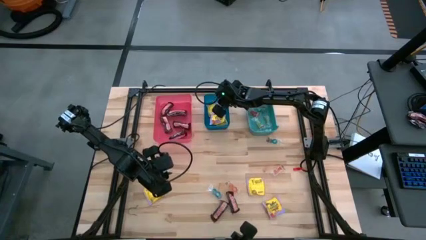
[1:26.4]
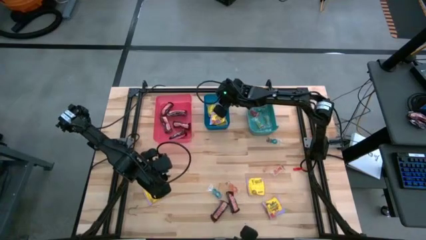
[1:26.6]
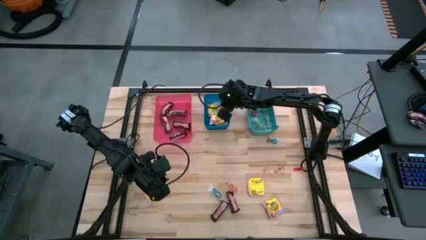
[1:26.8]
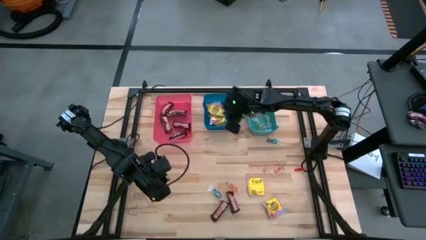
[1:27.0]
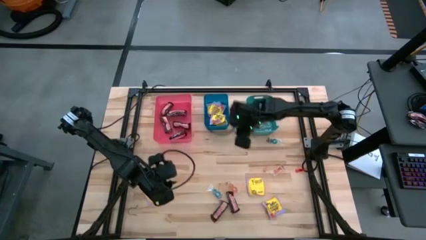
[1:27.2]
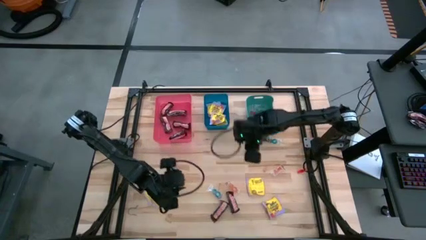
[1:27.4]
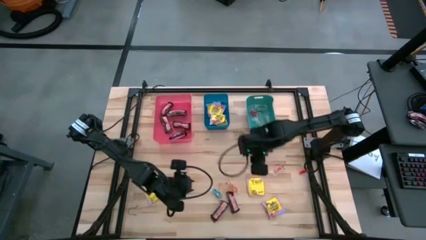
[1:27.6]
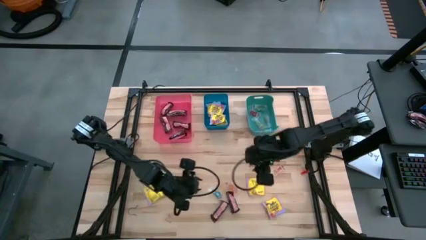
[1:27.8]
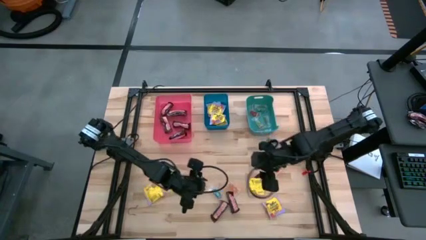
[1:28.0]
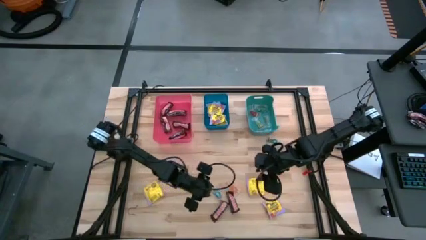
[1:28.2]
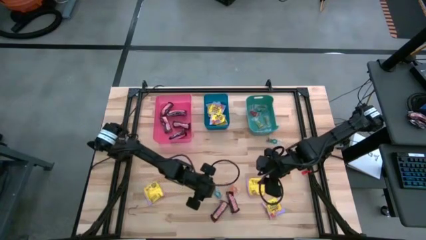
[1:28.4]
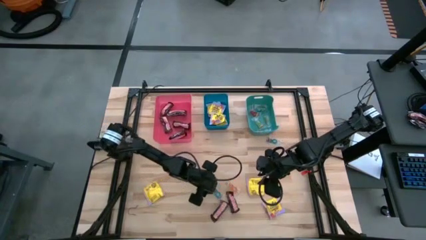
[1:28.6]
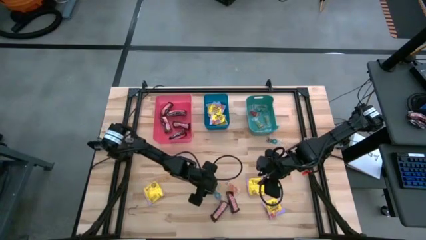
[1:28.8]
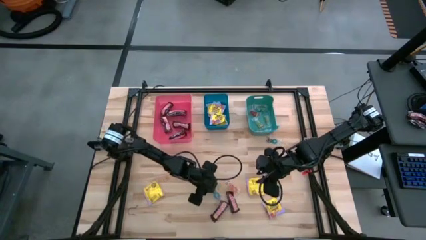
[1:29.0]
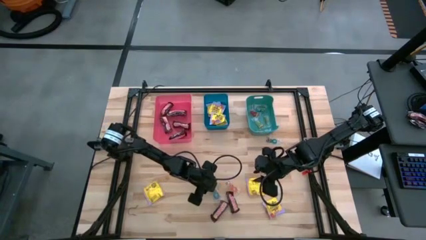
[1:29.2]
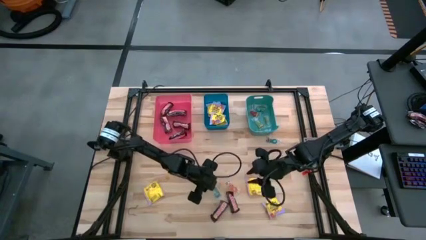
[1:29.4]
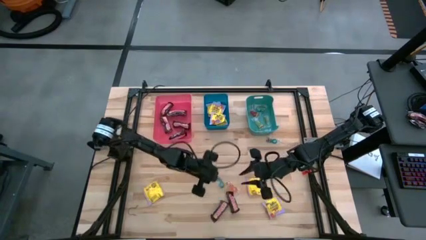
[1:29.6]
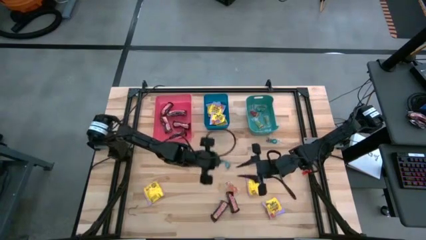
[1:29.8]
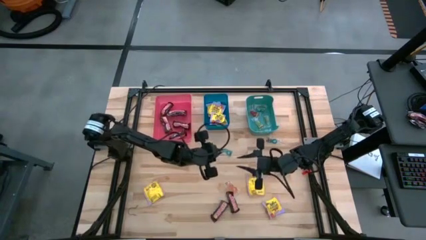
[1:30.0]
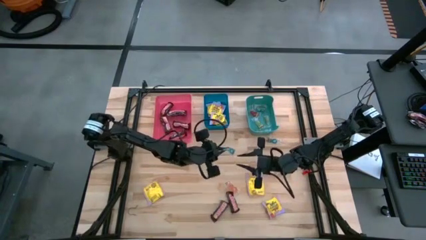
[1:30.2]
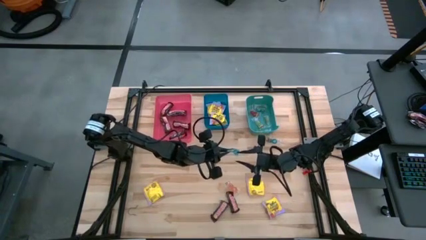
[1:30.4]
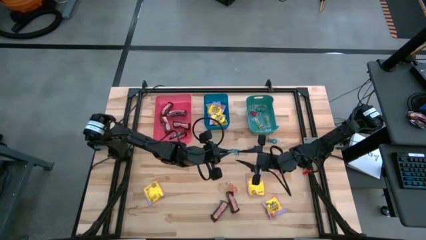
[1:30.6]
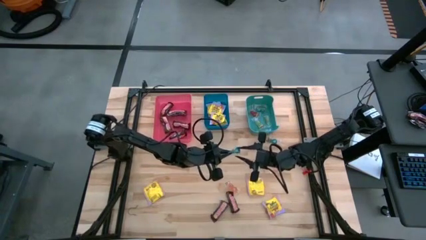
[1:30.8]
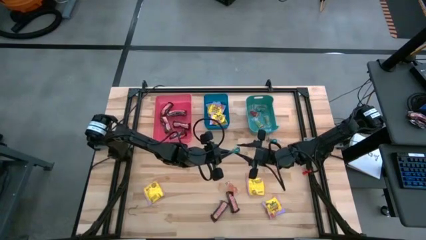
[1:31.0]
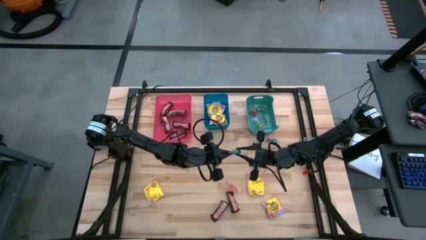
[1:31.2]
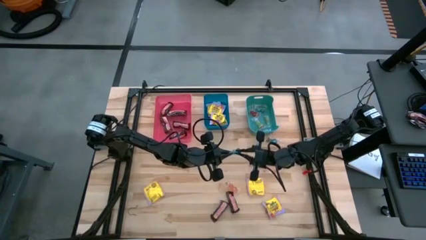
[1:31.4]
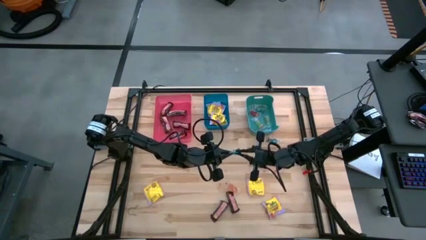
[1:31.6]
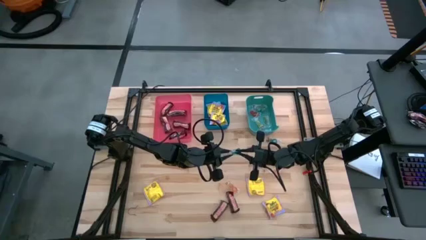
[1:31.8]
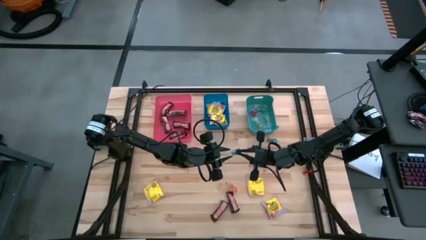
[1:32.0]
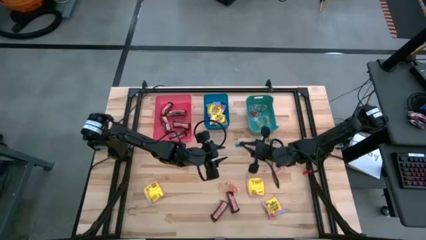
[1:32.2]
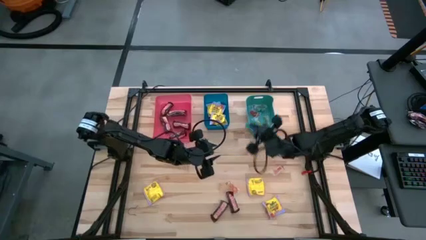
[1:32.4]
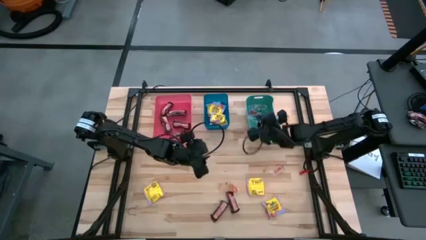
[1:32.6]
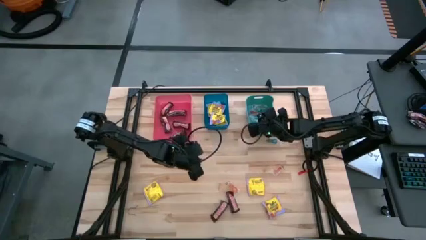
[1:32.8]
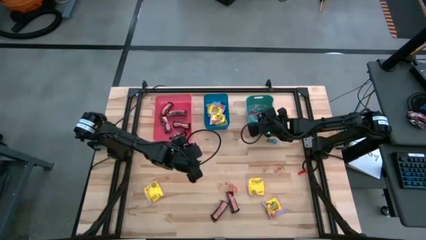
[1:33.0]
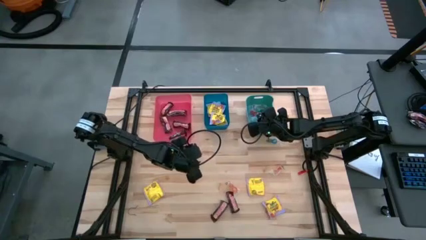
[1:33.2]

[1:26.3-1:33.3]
Task: Sort candy
Put the blue gummy candy into the green bin

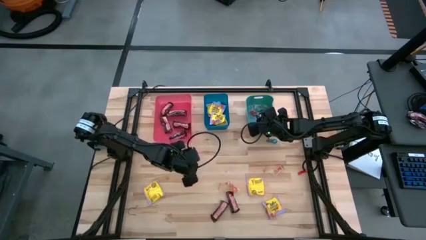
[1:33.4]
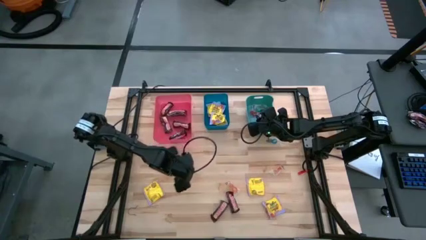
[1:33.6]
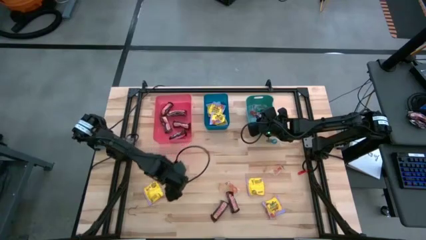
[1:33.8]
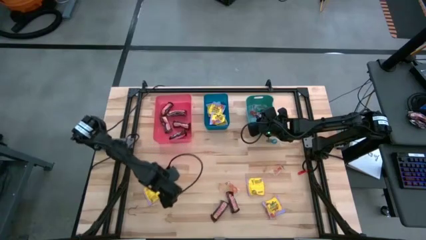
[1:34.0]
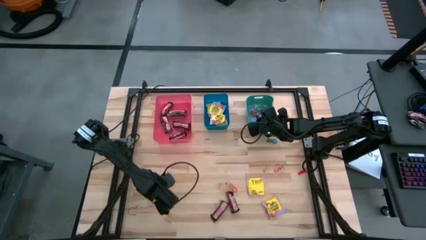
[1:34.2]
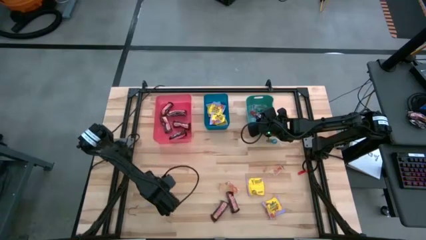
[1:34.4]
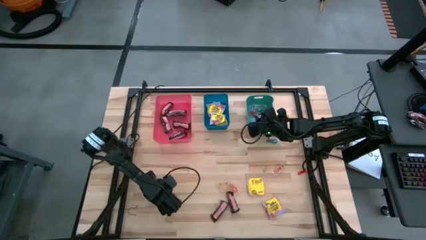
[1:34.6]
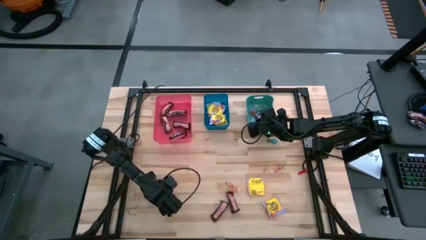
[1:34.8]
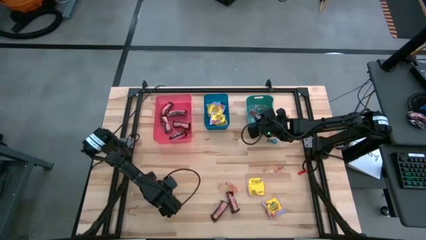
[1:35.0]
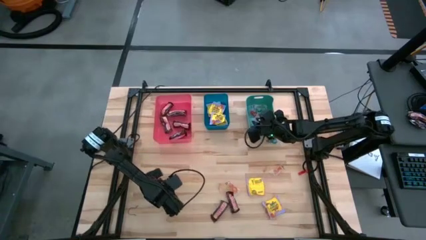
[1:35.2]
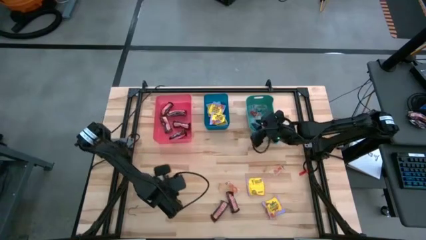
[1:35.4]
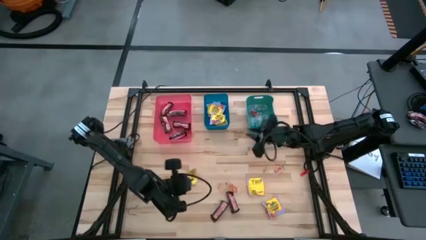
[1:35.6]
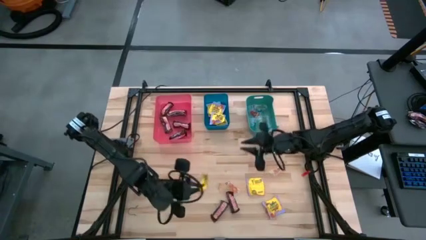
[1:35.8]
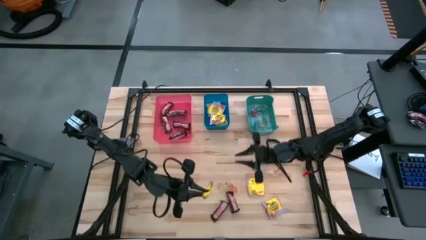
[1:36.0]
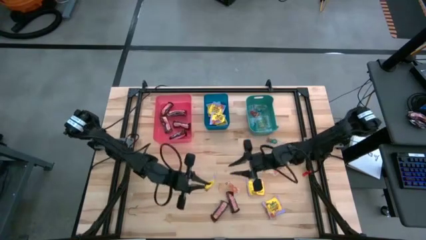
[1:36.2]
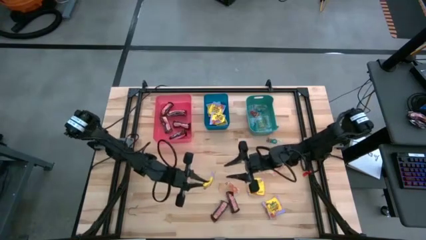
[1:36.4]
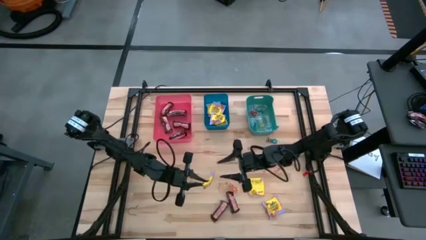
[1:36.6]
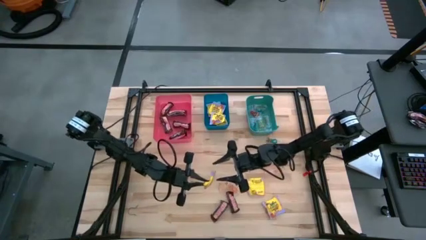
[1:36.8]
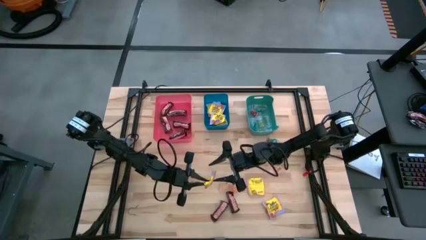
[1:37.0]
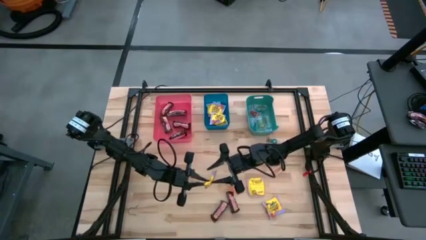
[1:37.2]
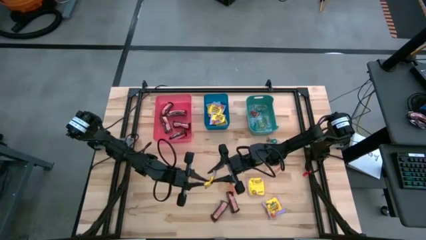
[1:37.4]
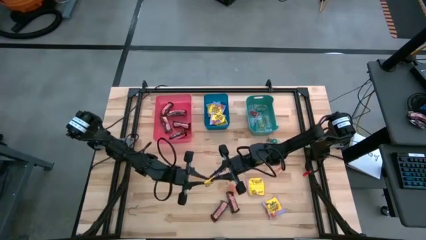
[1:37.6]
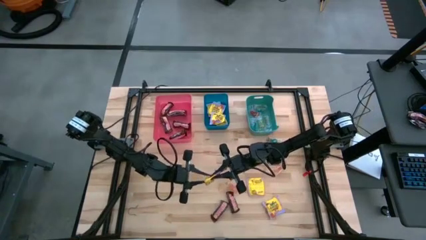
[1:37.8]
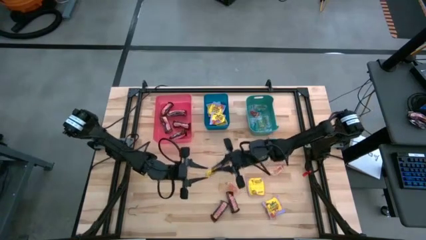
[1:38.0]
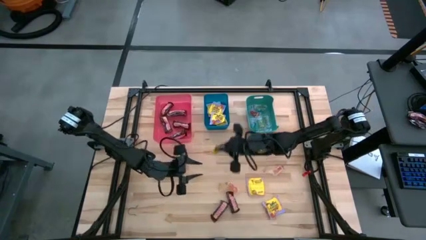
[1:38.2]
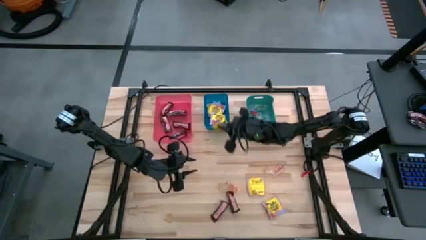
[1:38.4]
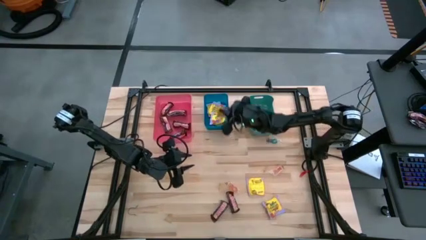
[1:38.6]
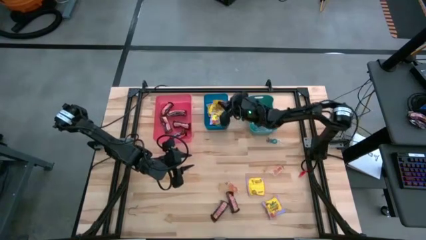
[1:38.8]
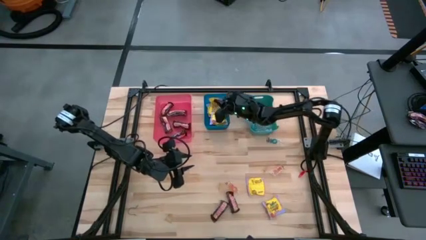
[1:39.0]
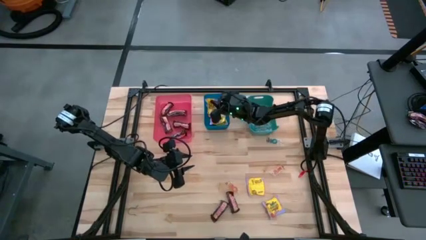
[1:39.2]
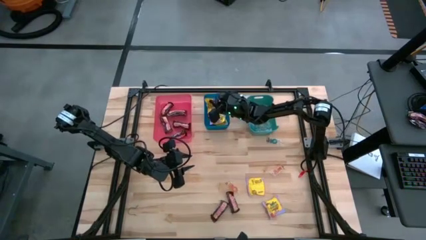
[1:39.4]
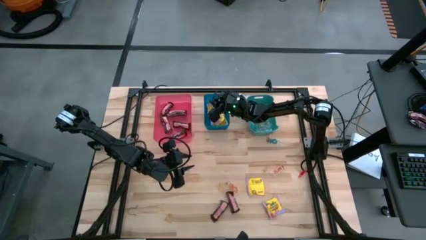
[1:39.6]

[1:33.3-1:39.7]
Put the yellow candy into the red bin

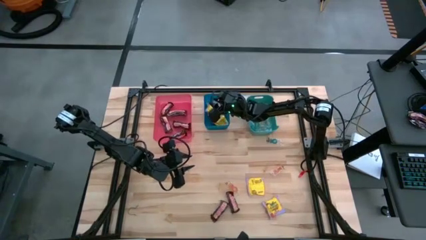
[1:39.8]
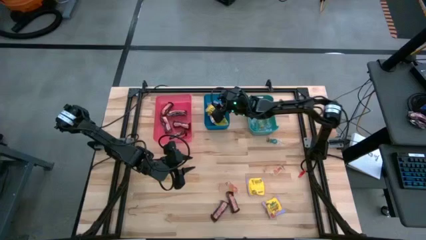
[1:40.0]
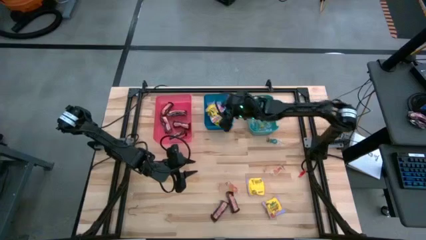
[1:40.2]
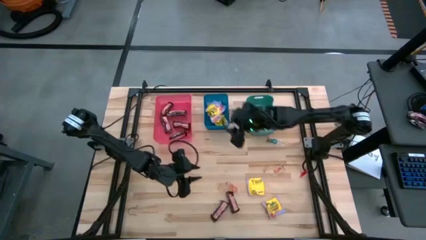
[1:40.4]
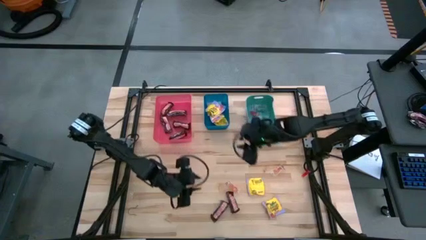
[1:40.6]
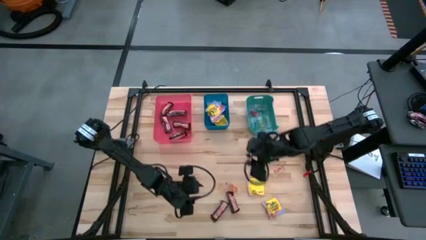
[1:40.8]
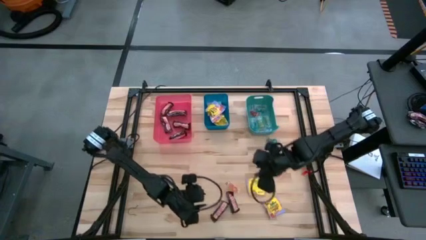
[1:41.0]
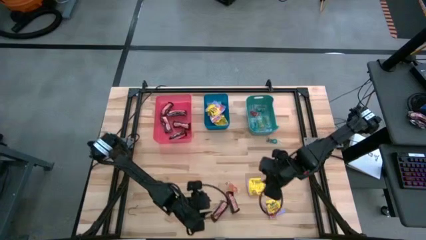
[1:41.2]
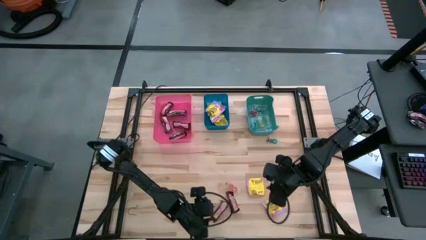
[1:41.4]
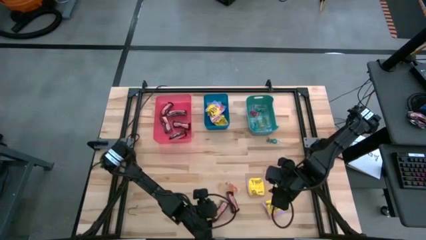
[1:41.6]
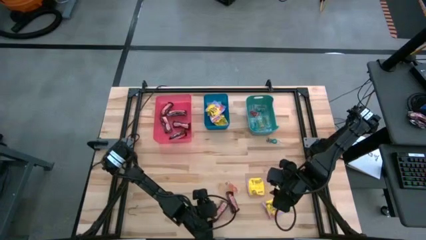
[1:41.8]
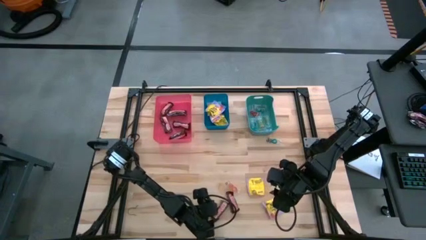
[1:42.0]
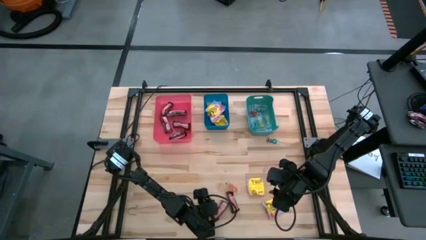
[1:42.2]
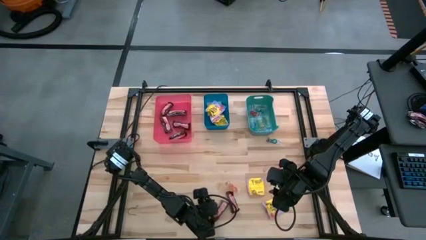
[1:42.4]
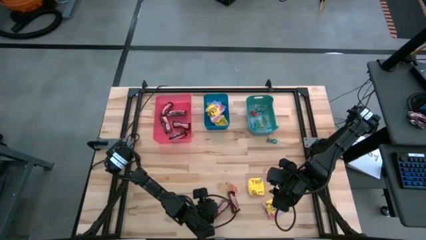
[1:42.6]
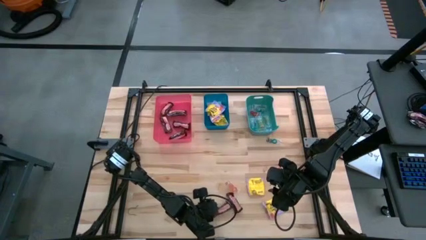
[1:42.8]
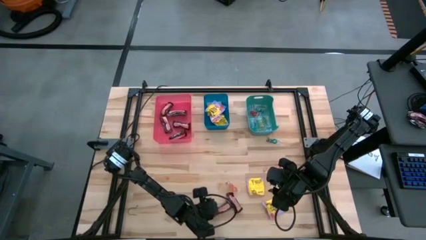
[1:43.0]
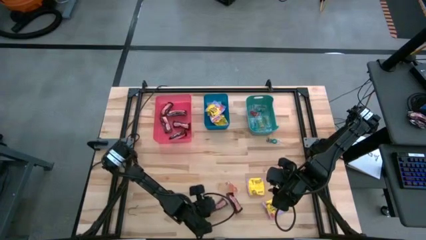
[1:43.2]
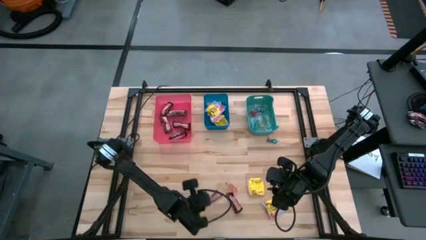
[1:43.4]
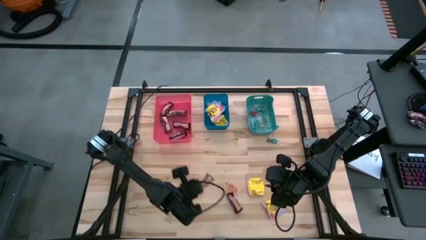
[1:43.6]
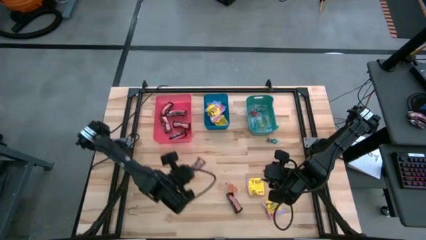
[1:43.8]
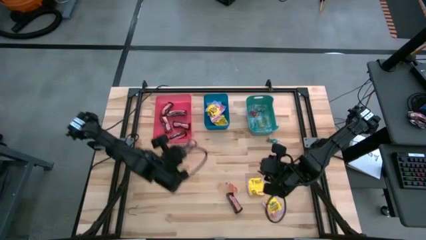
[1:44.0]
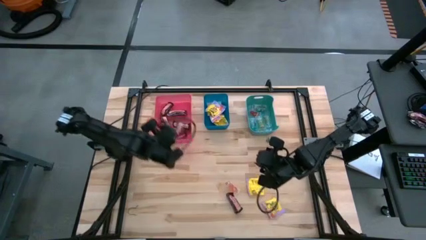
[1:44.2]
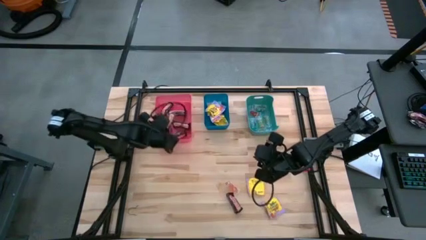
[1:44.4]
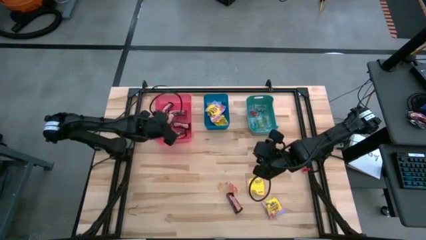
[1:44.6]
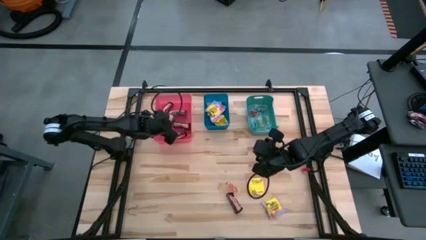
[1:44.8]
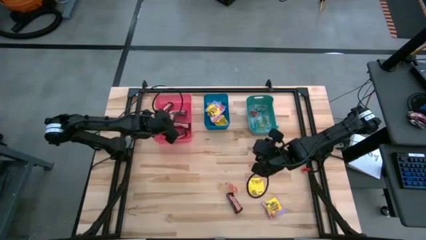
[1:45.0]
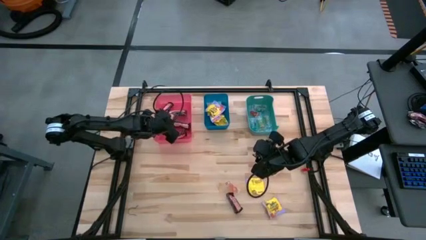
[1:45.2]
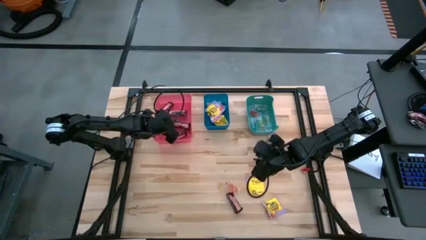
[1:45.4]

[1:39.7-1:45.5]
Put the chocolate bar into the red bin
